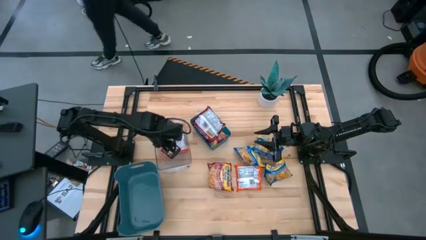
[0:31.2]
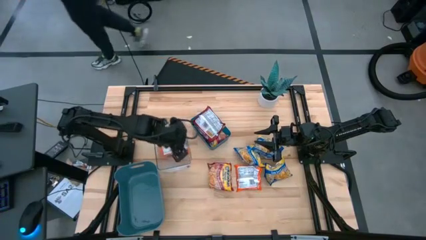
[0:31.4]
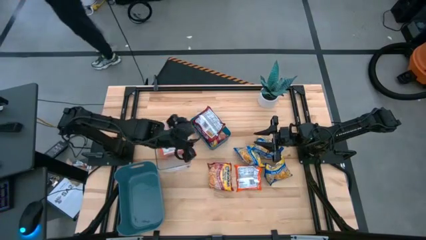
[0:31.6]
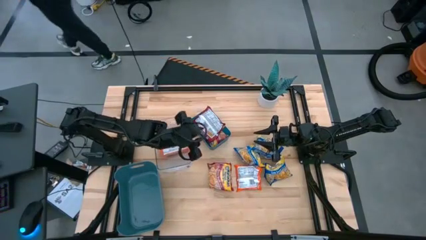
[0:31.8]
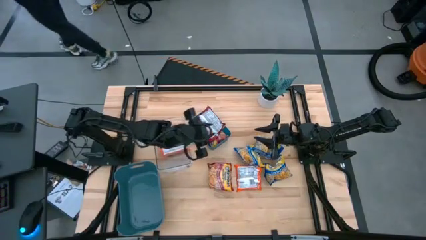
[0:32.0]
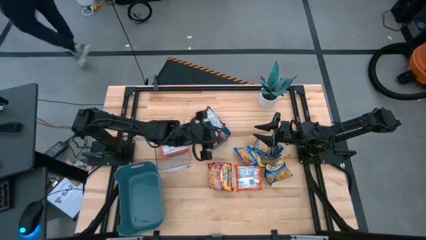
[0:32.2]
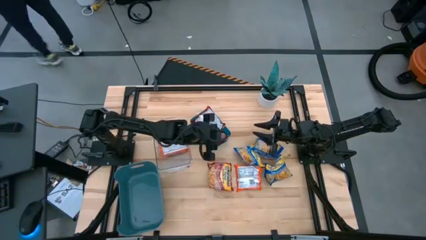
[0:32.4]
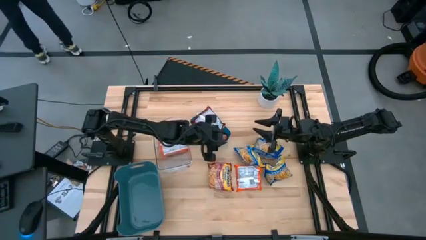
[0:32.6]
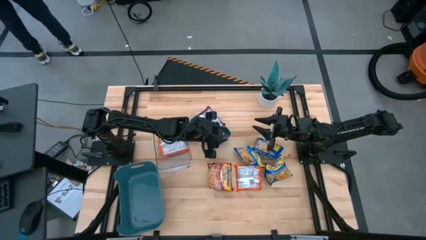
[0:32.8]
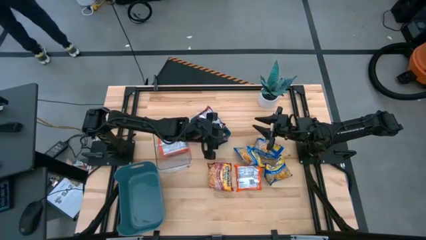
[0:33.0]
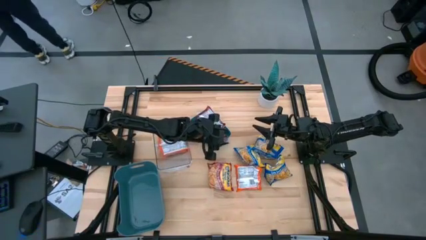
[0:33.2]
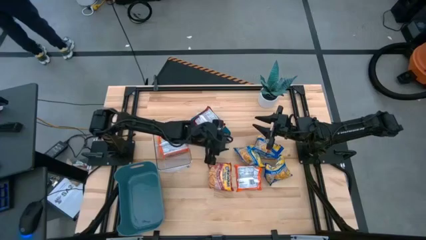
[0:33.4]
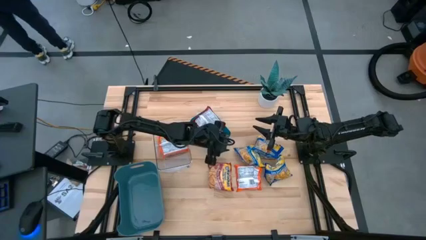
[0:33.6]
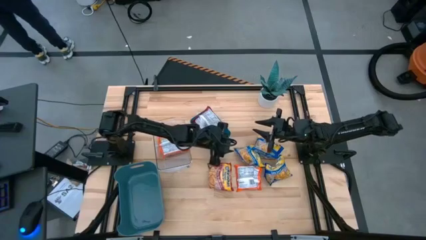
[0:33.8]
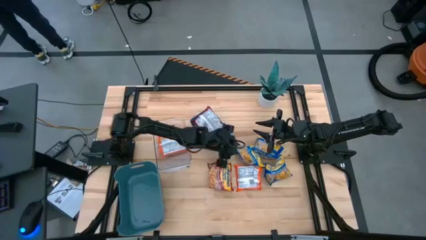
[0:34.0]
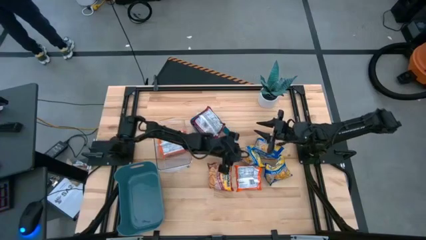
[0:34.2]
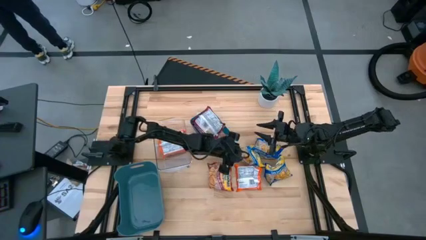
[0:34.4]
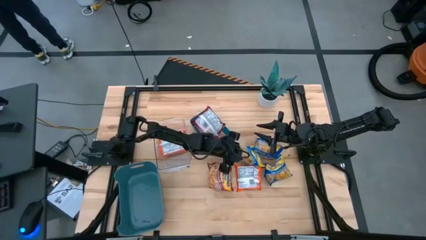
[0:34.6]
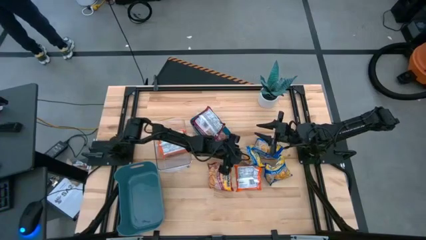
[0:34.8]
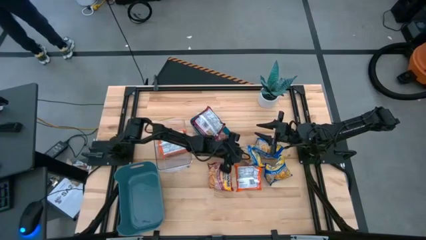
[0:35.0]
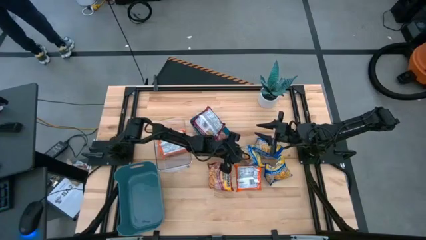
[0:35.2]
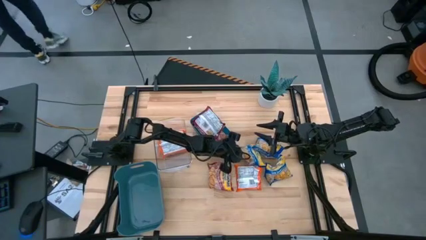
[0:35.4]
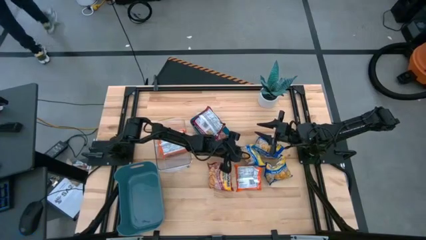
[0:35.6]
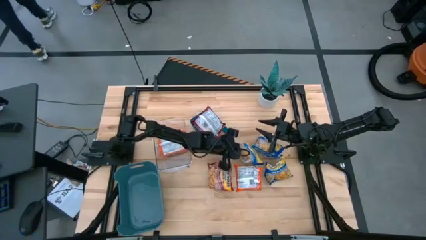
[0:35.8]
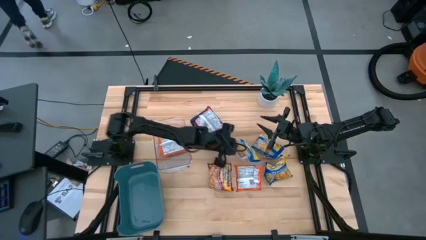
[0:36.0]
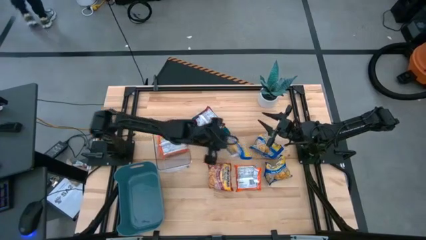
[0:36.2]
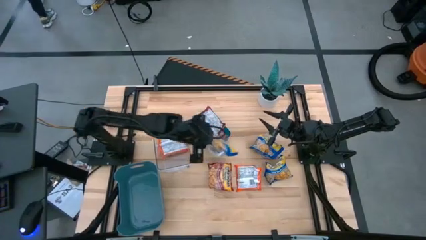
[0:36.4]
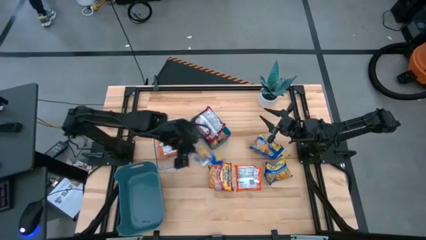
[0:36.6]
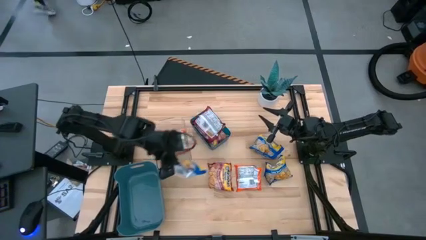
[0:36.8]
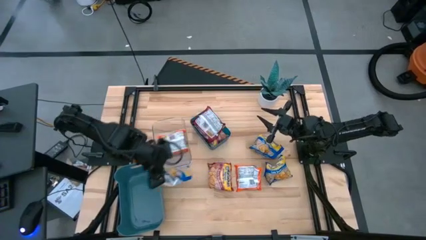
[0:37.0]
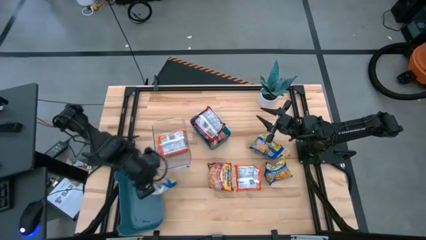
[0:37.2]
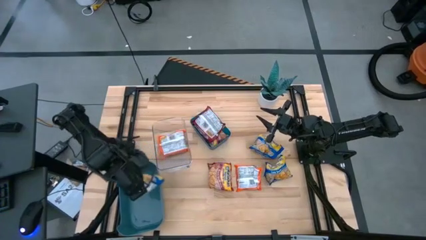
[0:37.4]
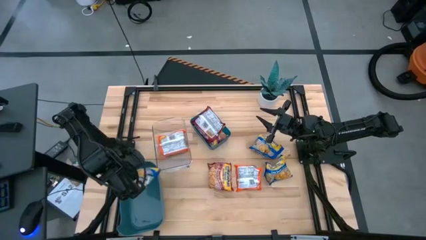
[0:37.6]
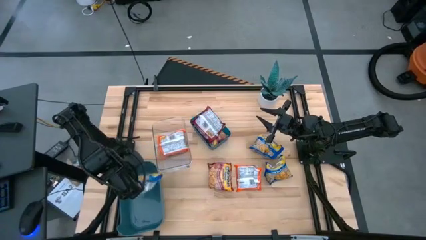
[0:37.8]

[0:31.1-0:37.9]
Task: Sort Maruchan noodles
Put the blue noodle pack into the green bin

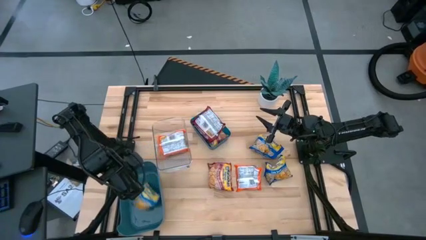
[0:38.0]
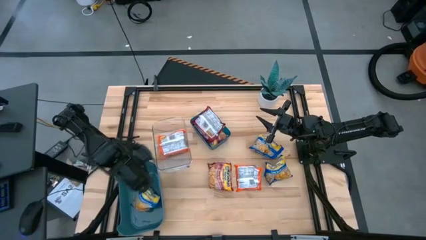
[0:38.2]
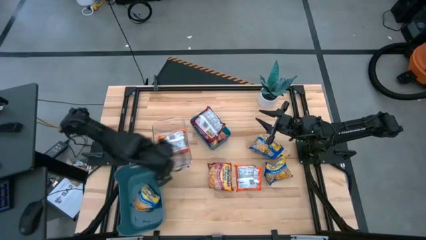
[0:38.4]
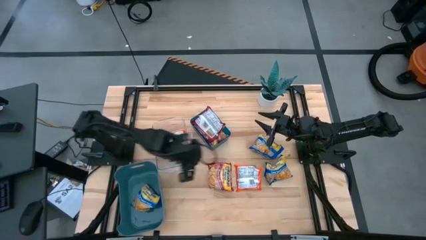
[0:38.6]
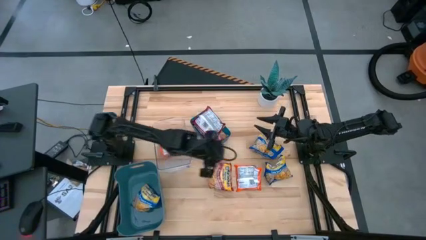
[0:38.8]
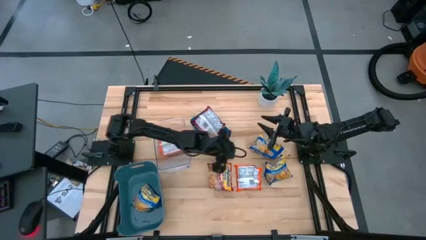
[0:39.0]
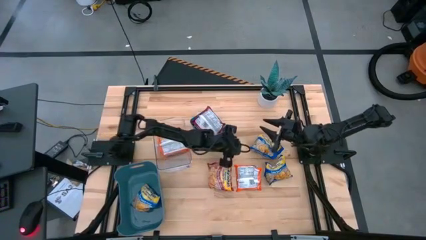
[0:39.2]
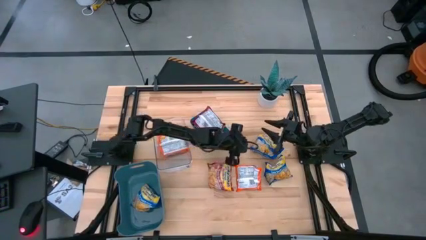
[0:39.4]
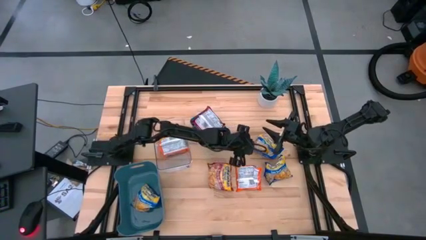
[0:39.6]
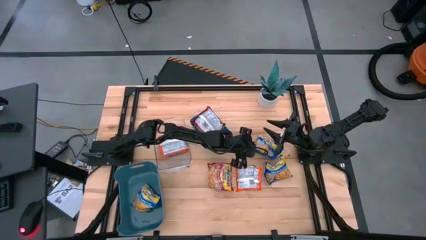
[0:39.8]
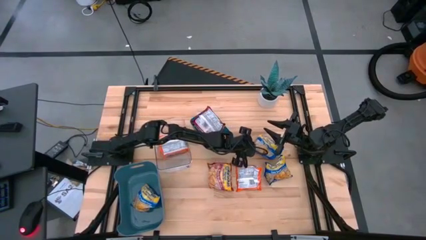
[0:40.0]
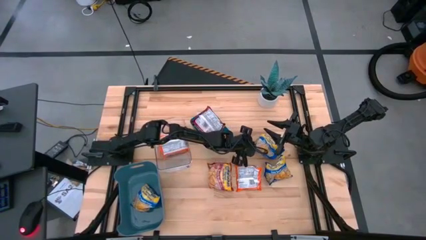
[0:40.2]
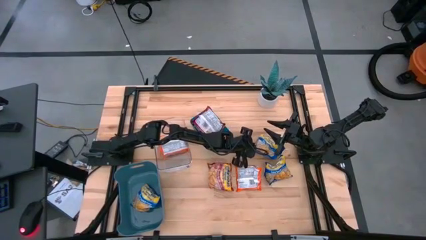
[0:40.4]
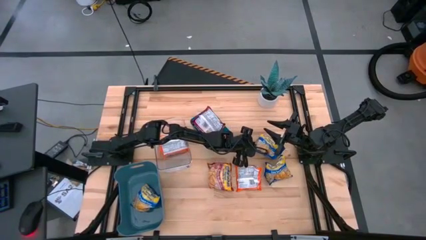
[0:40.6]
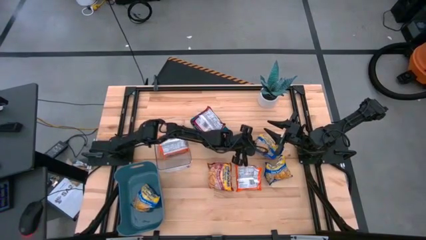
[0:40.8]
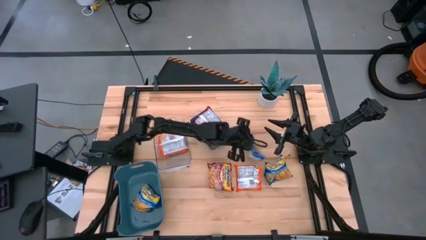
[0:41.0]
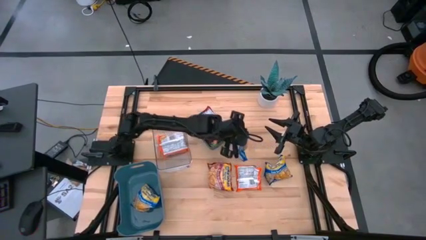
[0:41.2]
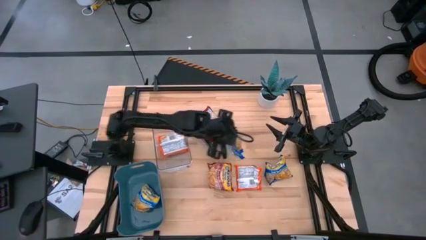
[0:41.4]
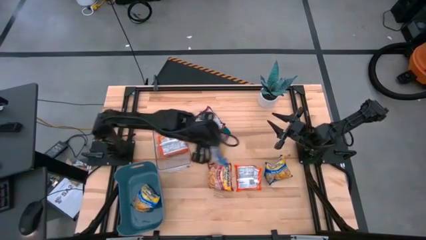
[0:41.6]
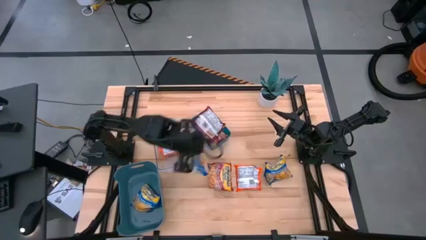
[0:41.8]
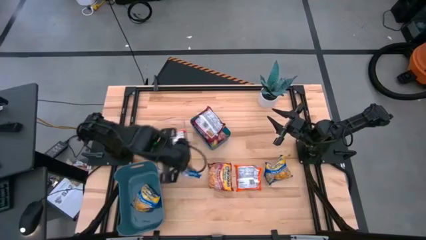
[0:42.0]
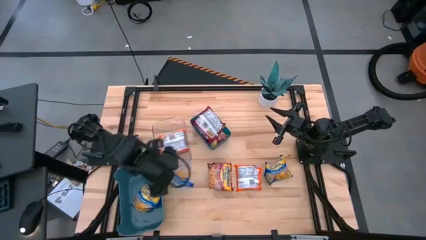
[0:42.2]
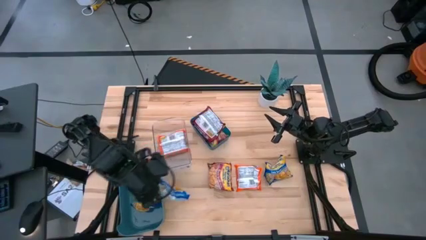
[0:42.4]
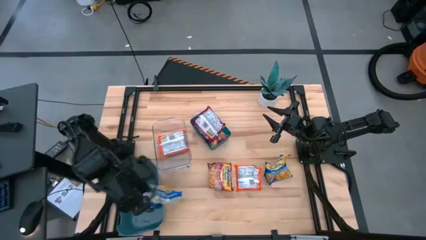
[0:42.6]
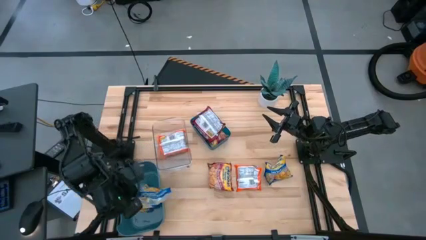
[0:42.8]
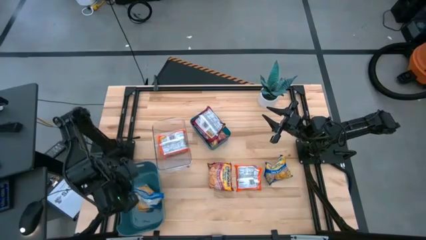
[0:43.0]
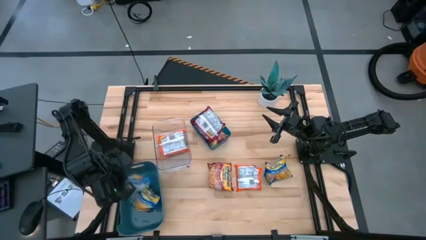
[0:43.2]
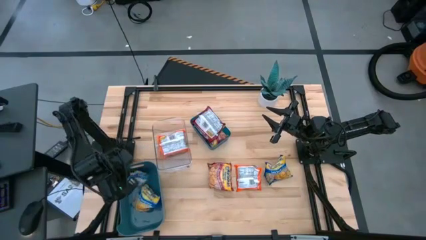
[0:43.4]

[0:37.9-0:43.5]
Put the blue noodle pack into the green bin

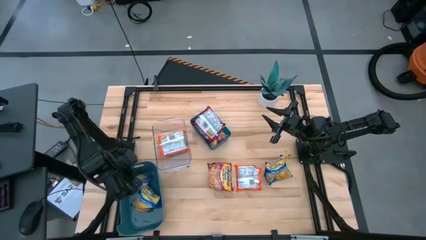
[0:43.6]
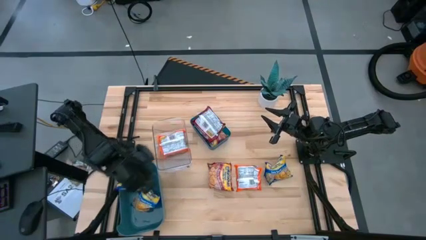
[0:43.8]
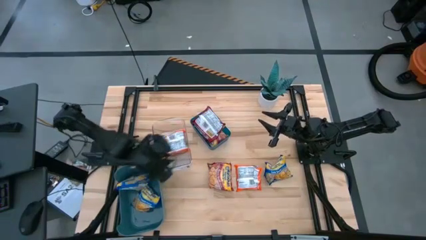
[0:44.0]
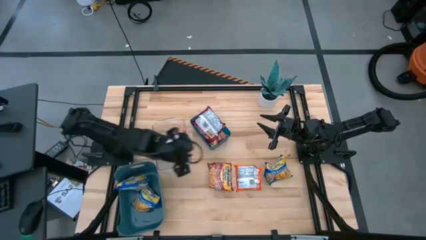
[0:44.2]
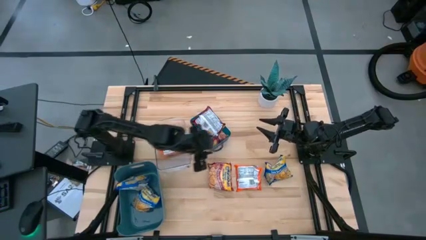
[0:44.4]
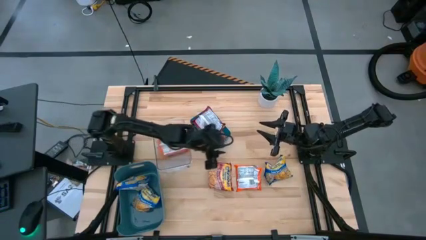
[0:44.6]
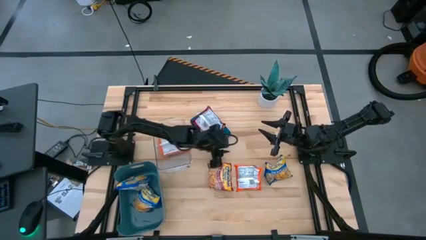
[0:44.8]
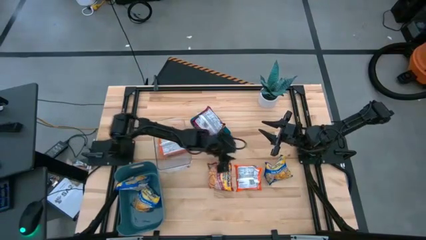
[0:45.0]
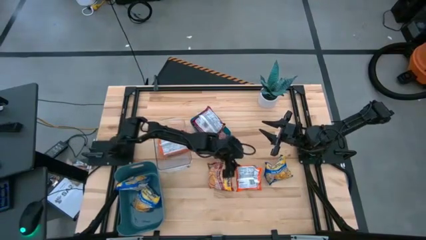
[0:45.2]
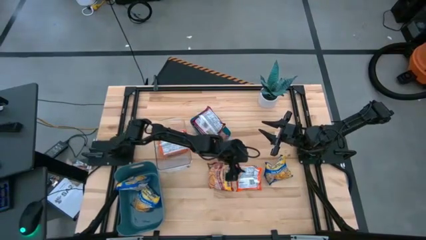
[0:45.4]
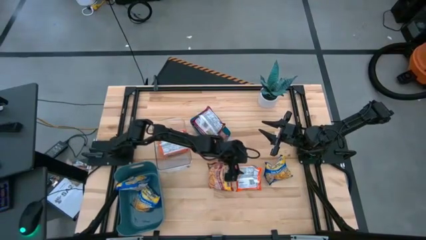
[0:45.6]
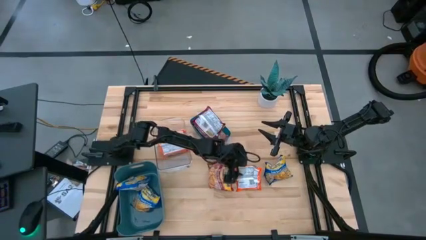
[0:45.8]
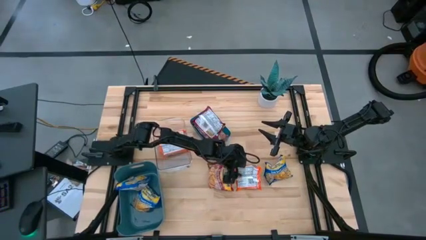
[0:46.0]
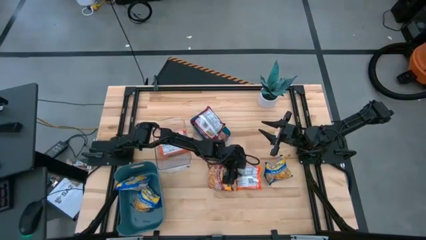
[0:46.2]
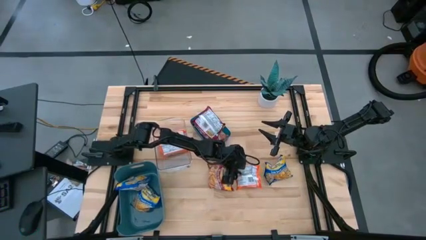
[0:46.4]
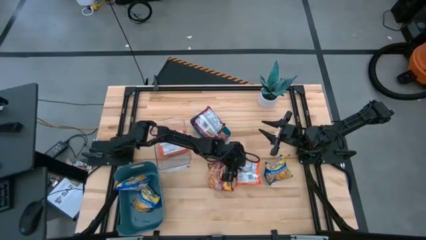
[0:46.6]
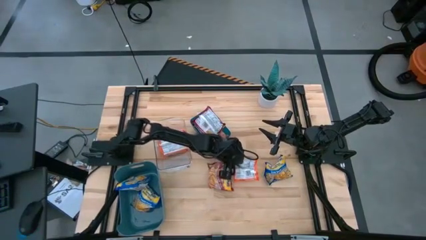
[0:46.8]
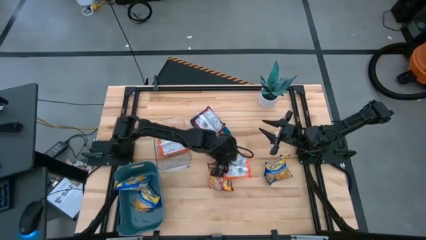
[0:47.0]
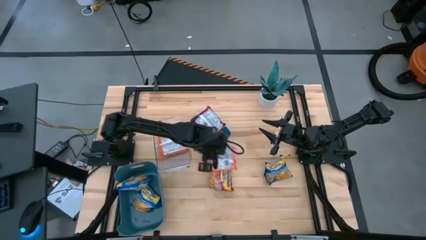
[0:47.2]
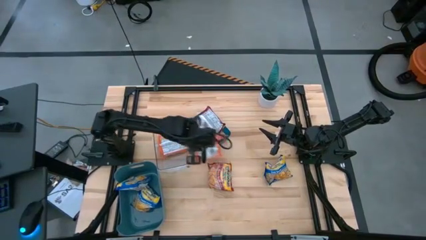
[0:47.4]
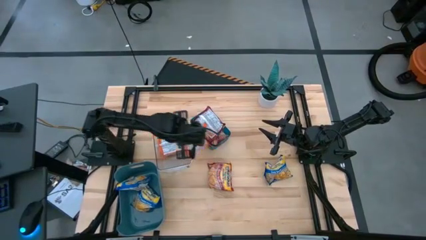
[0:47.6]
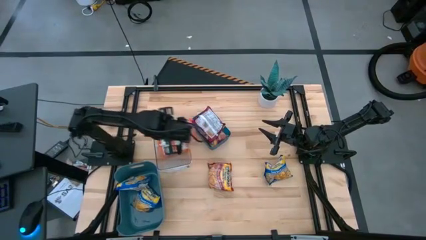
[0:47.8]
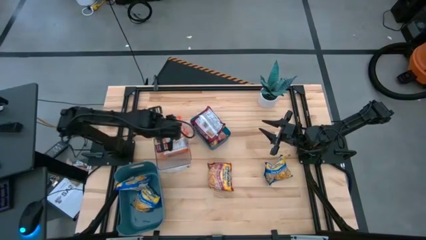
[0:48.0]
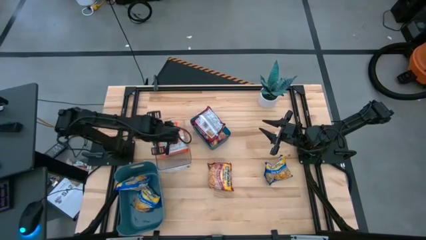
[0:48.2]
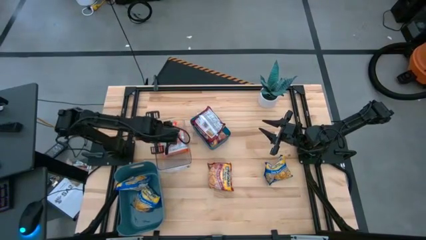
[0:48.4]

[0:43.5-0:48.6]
Put the orange noodle pack into the transparent bin

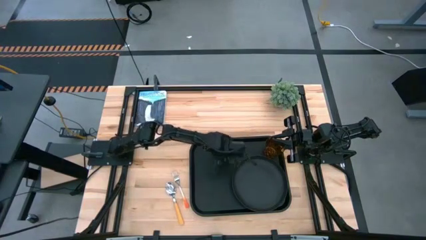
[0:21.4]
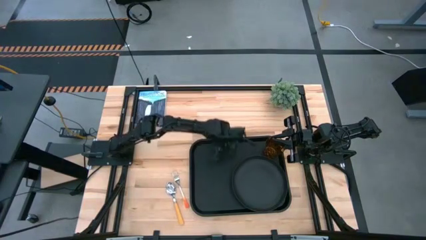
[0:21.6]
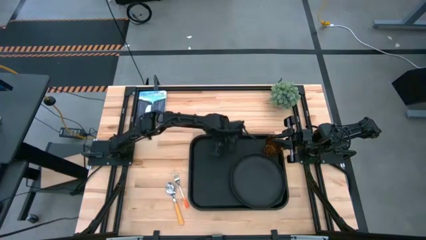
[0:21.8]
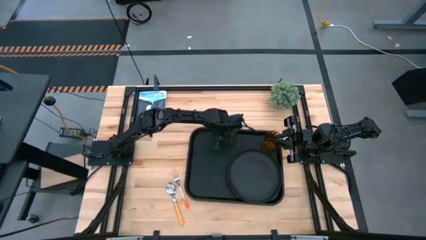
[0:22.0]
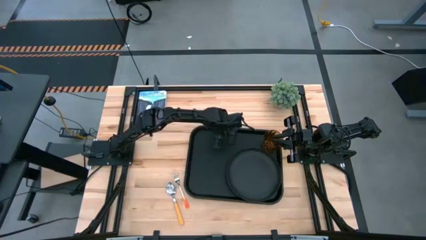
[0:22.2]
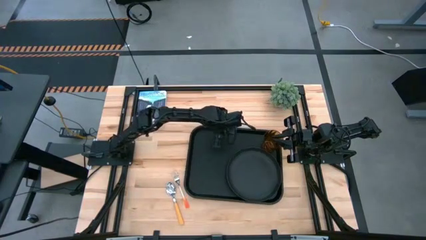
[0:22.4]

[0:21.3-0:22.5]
Task: Pick and place plate/cup/fork/spoon on tray
Move the black tray slightly to the top
